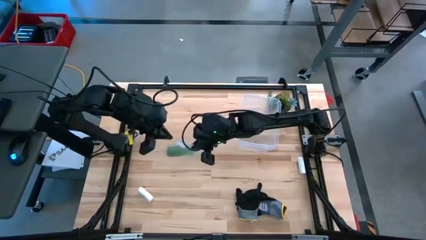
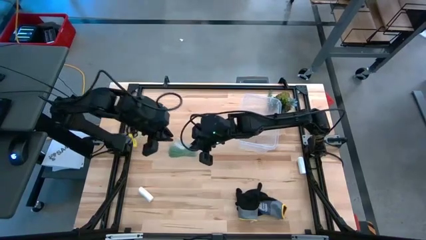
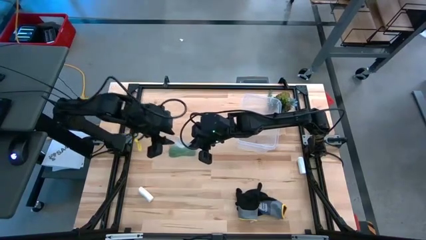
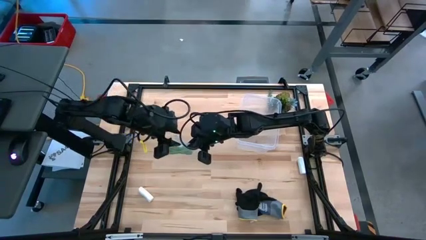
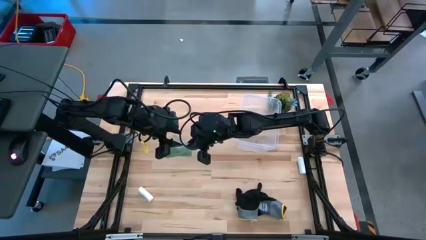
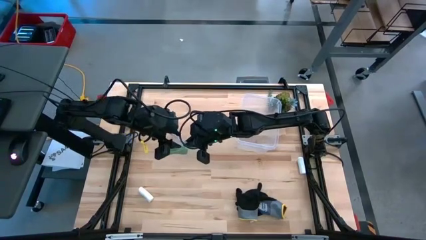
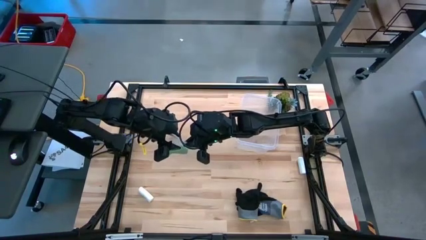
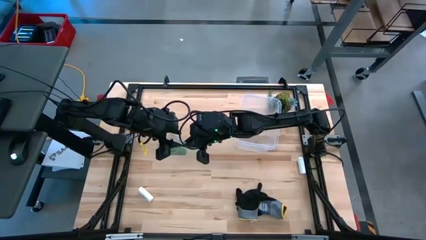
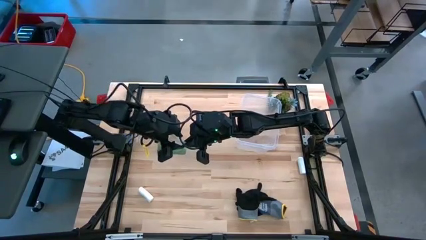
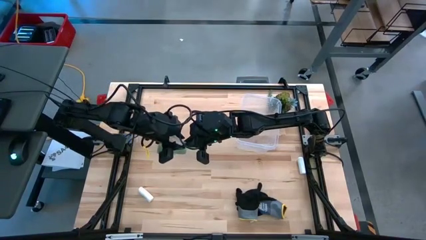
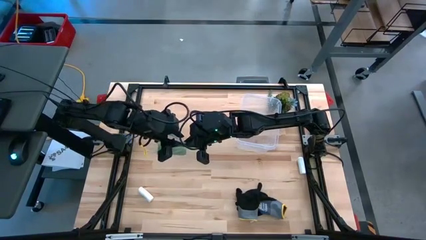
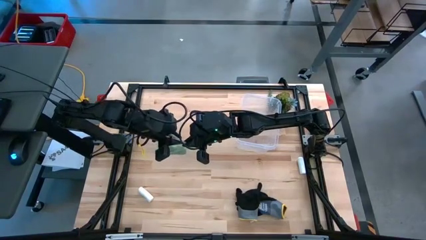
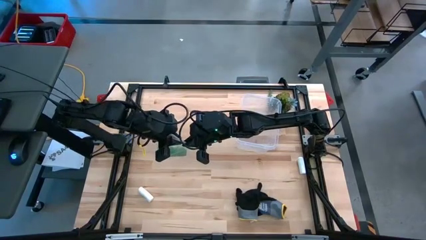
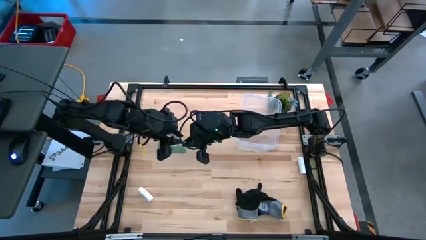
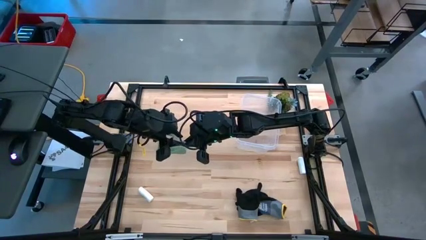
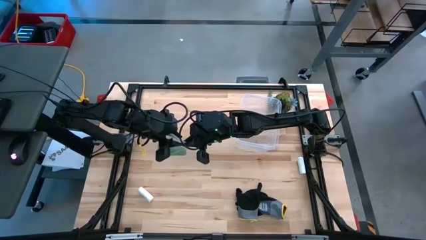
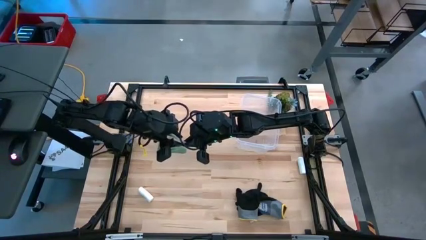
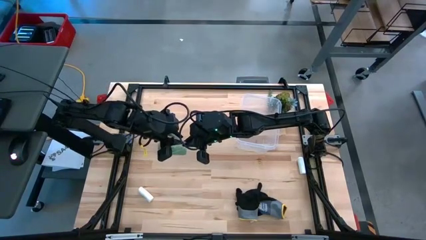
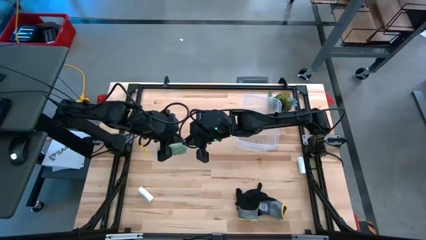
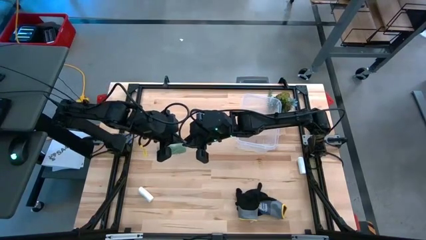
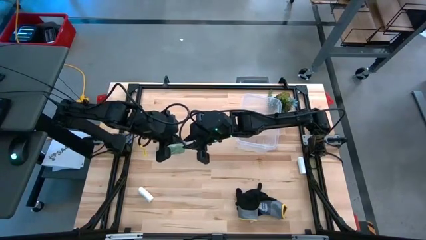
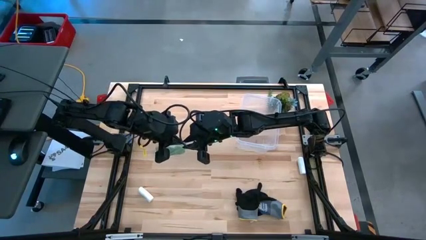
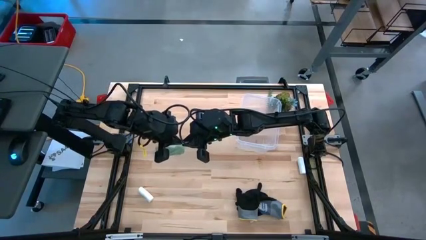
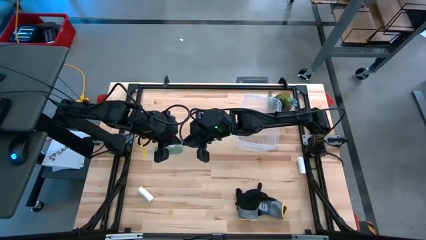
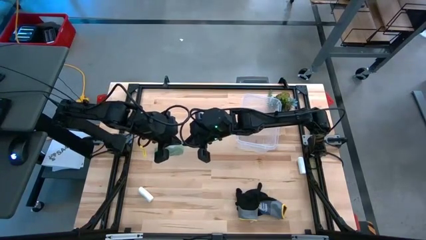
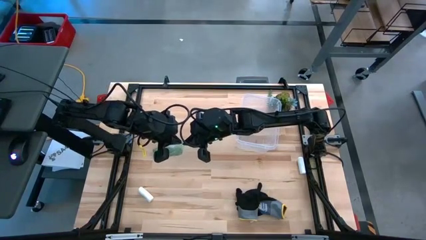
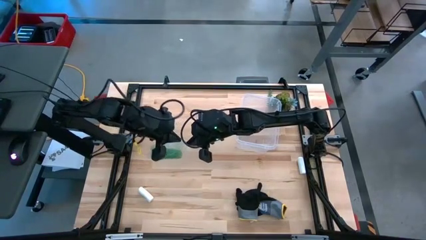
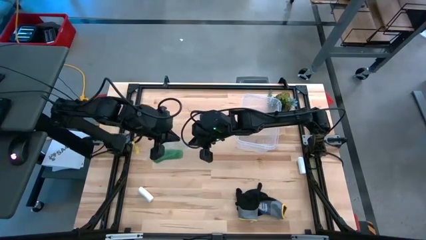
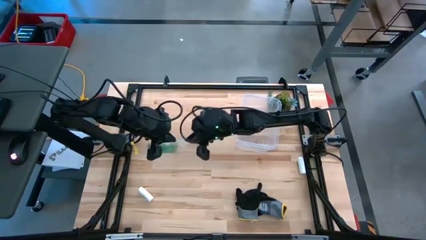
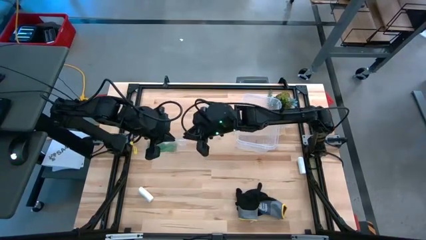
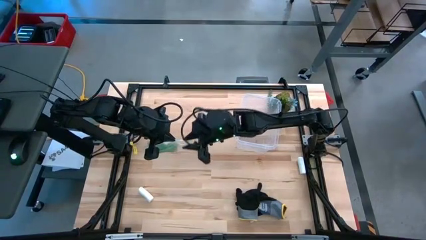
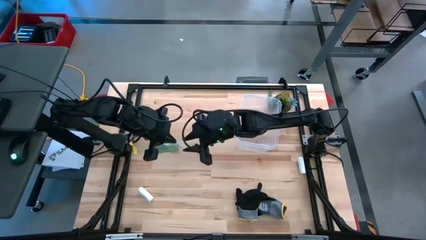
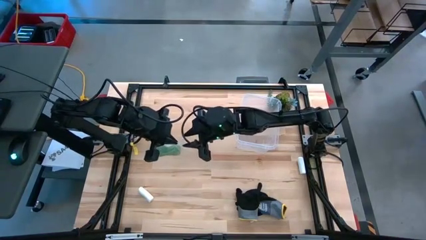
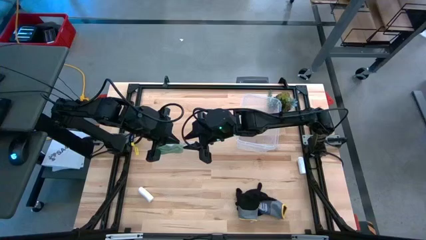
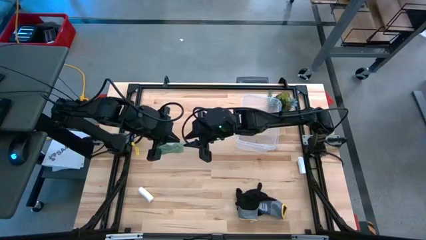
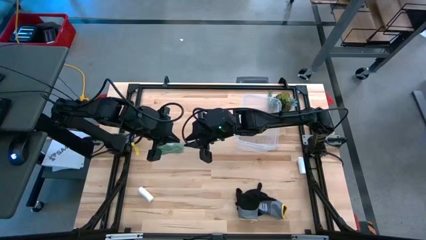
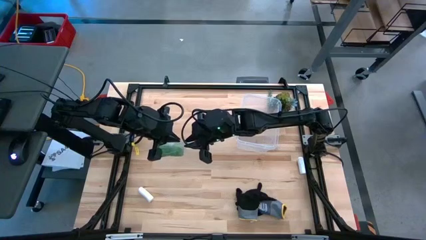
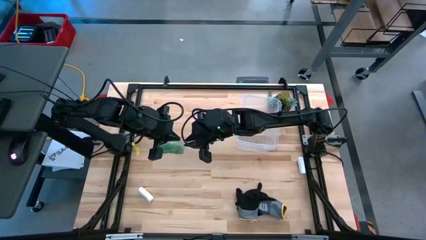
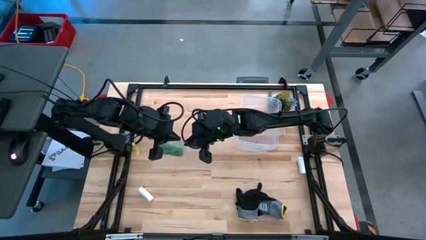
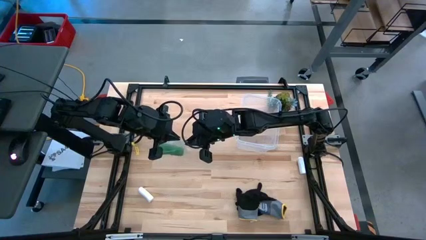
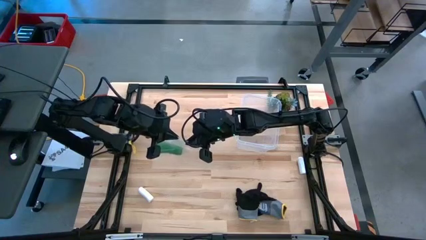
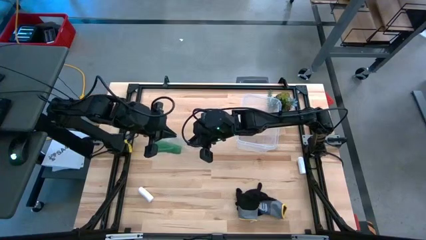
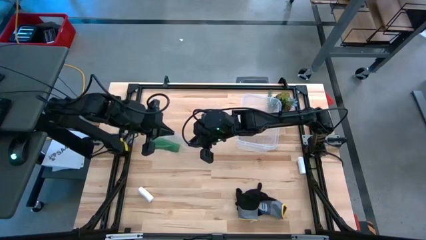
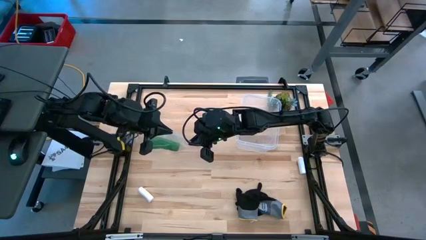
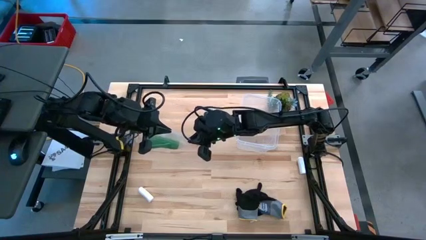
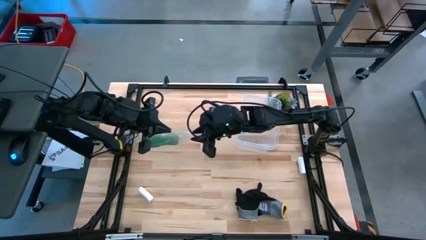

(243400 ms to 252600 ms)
Task: Roll bandage
Close the transparent zip bag

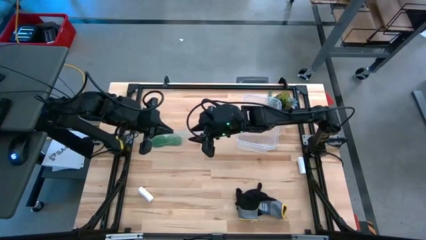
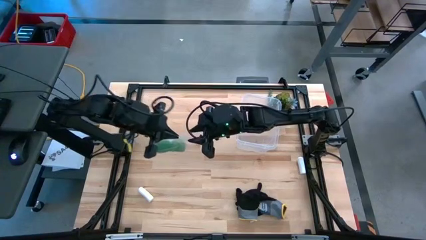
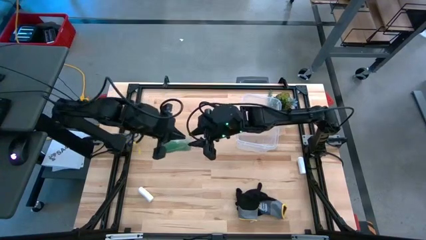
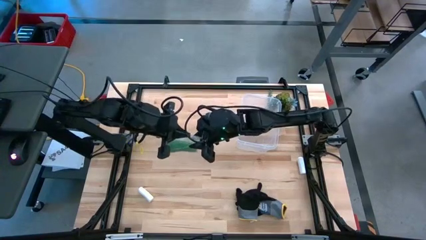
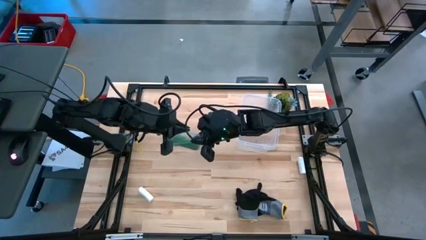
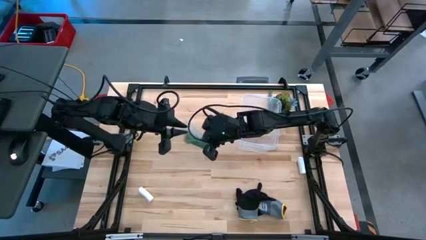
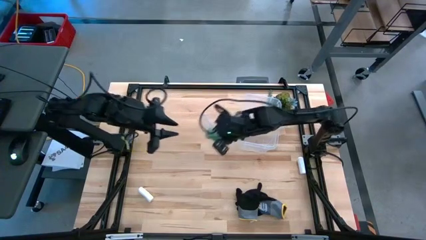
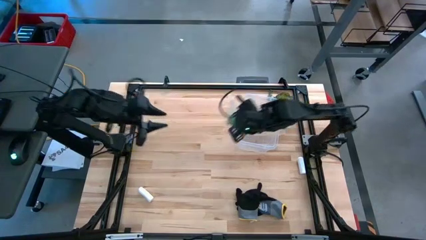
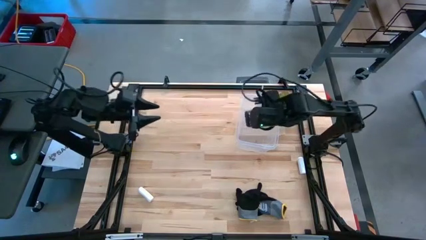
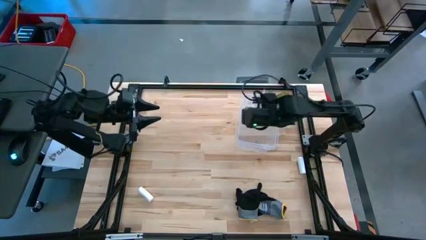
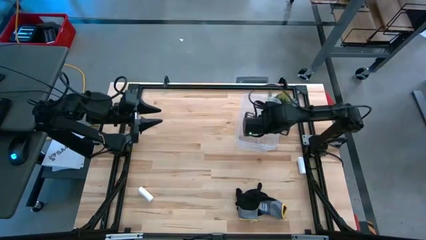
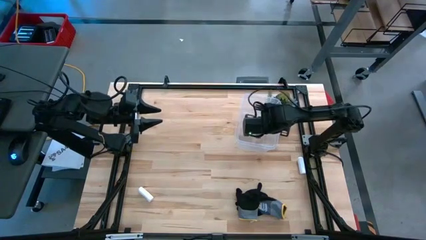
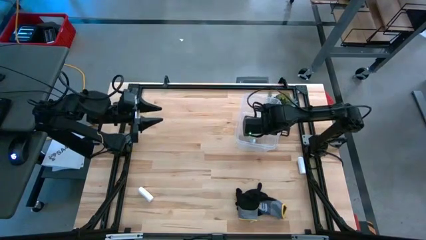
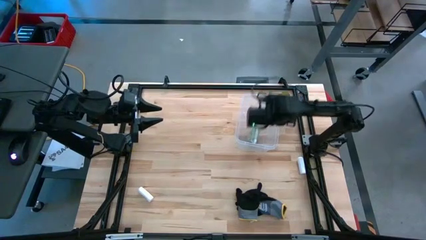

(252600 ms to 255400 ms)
Put the transparent zip bag into the transparent bin

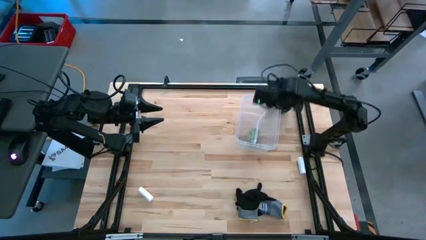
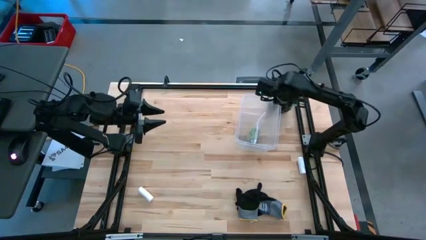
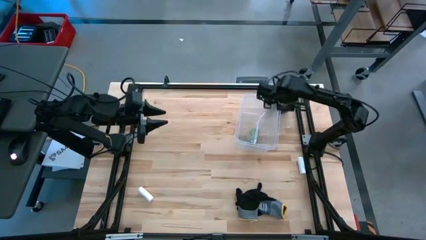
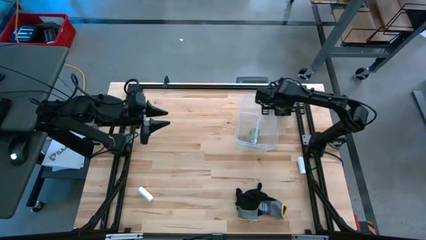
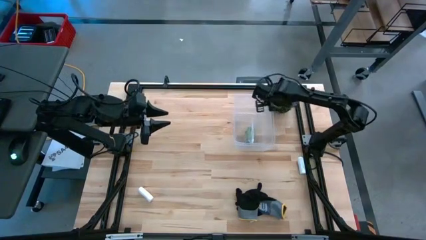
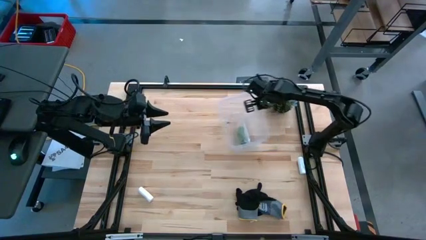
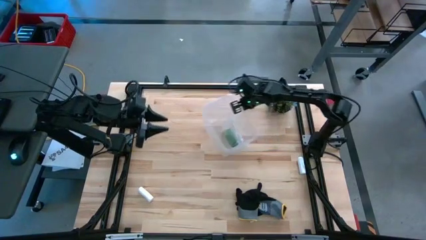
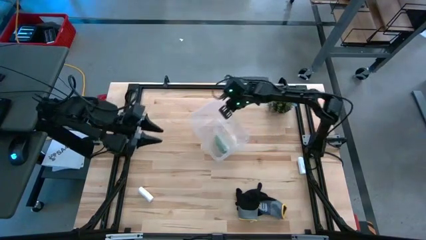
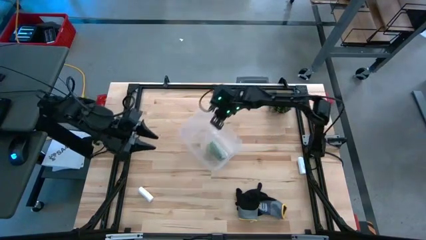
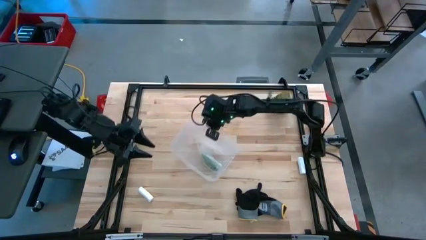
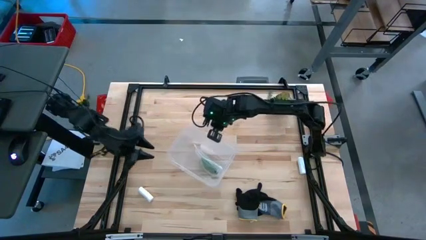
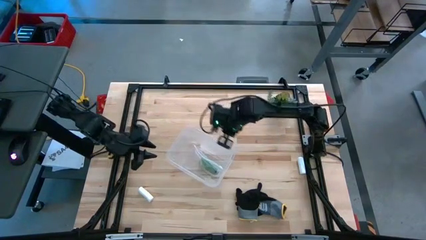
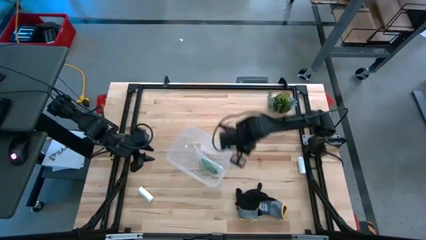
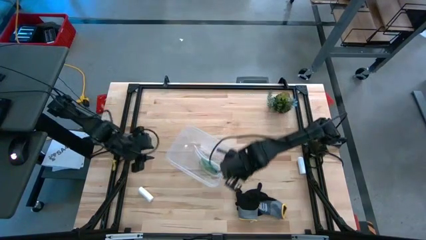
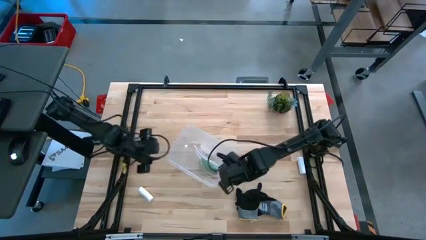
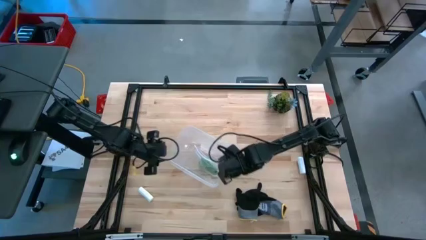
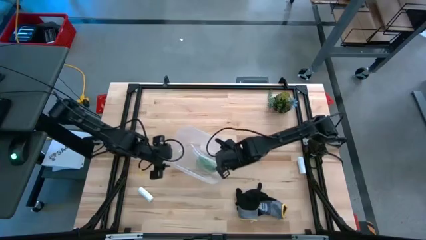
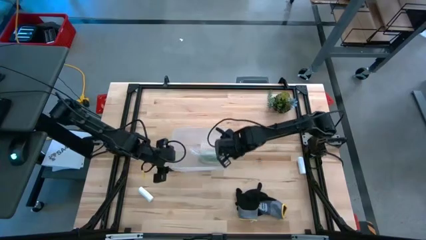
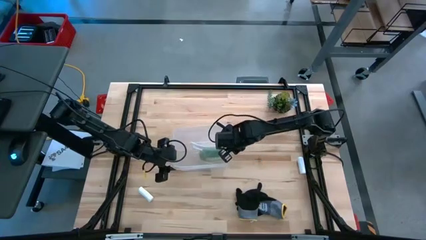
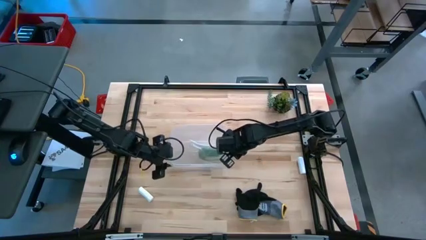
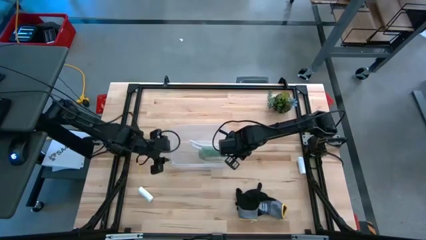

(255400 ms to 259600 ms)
Move the transparent bin to the center of the table
